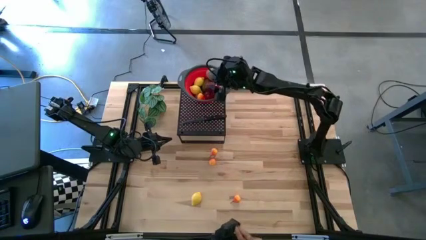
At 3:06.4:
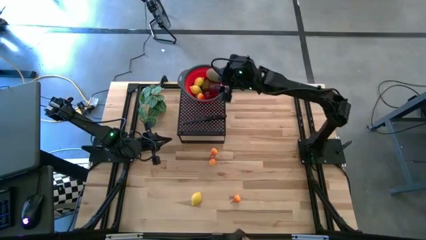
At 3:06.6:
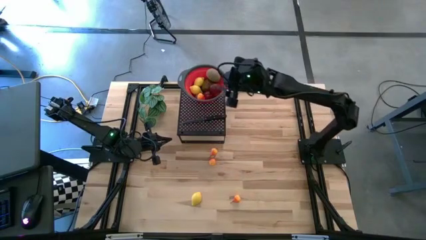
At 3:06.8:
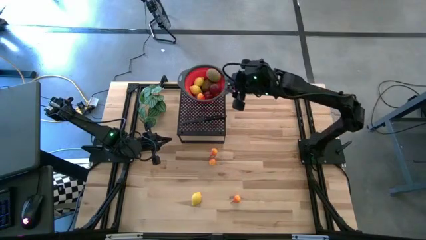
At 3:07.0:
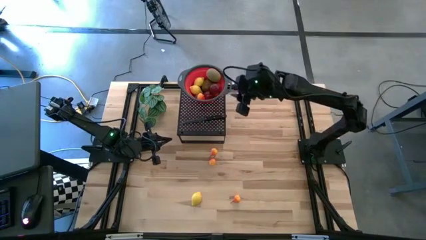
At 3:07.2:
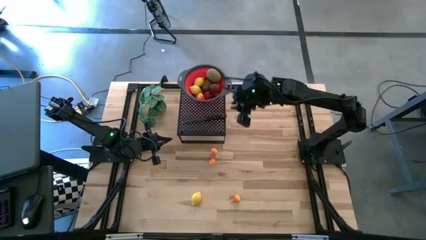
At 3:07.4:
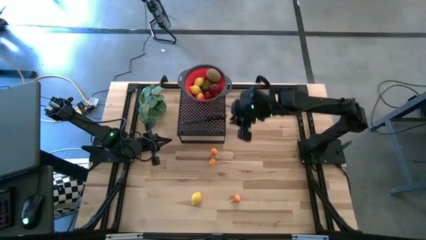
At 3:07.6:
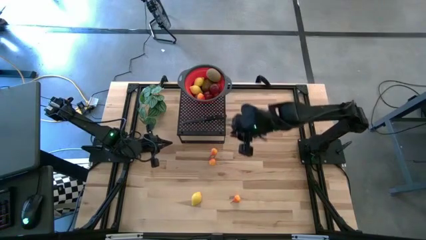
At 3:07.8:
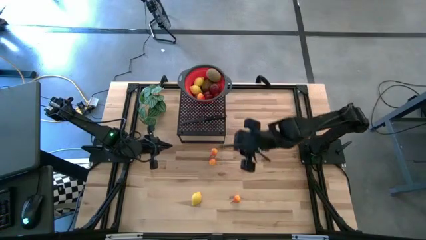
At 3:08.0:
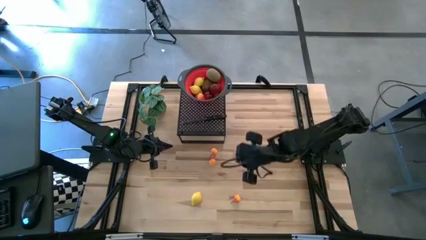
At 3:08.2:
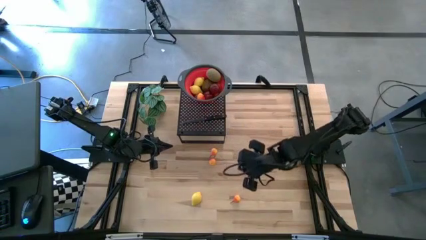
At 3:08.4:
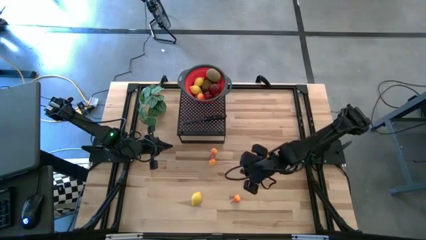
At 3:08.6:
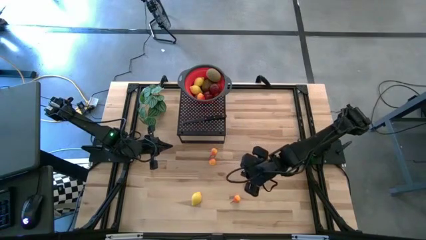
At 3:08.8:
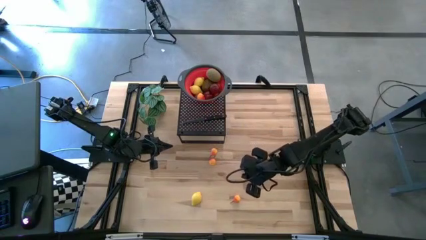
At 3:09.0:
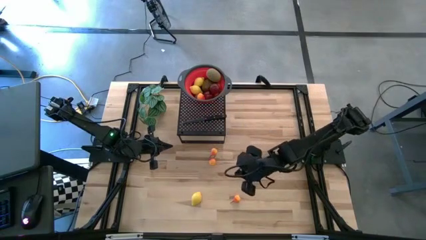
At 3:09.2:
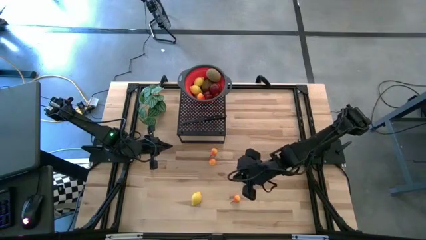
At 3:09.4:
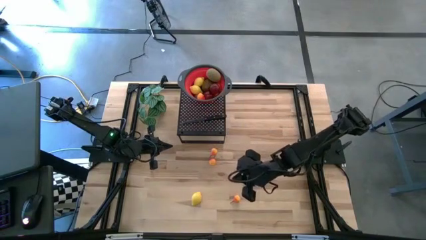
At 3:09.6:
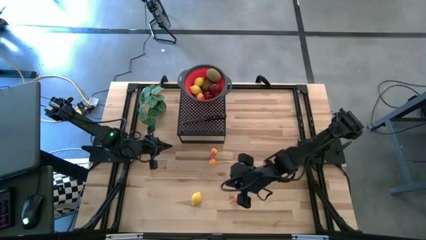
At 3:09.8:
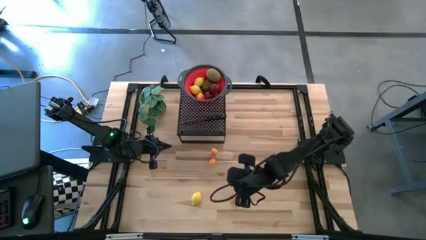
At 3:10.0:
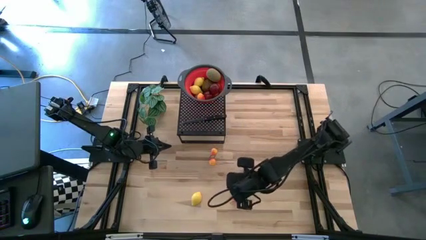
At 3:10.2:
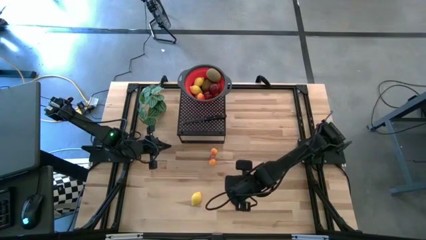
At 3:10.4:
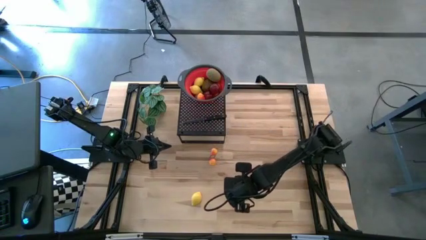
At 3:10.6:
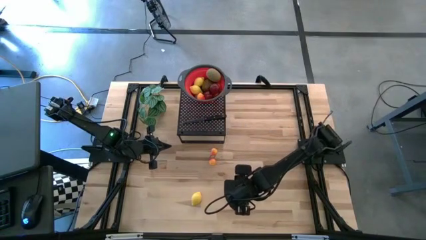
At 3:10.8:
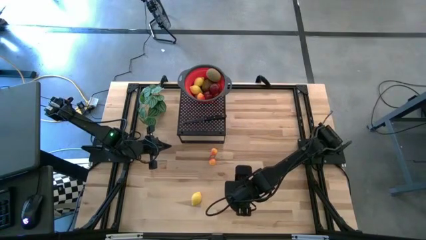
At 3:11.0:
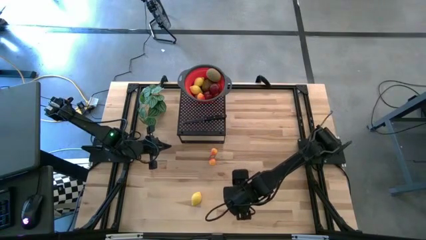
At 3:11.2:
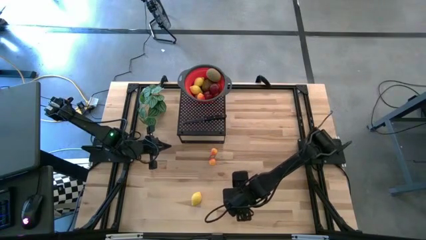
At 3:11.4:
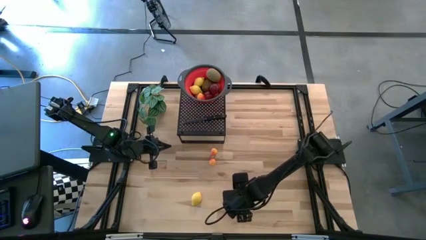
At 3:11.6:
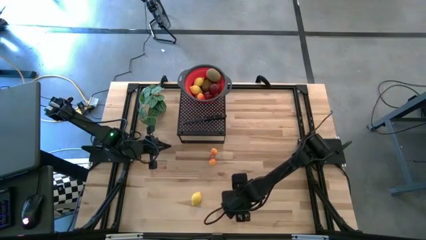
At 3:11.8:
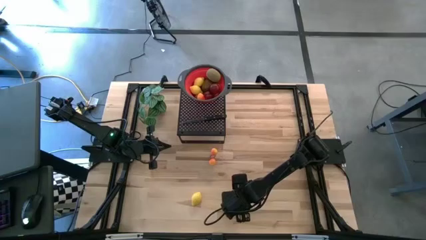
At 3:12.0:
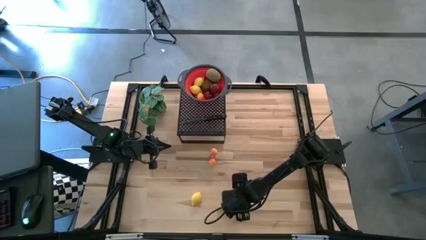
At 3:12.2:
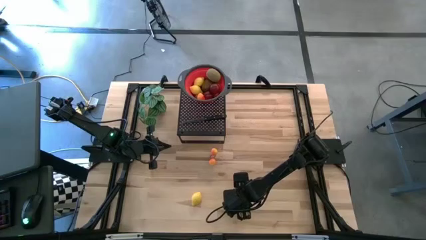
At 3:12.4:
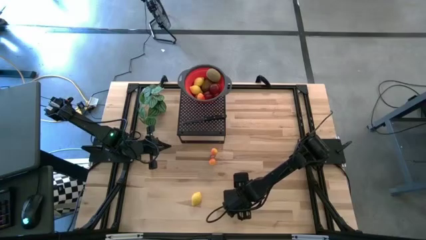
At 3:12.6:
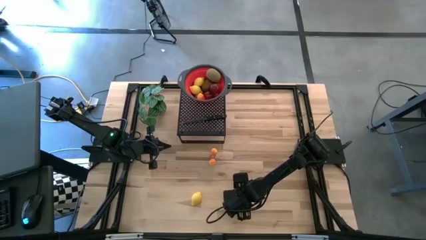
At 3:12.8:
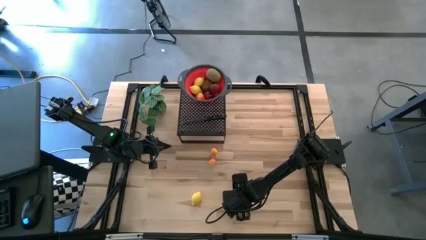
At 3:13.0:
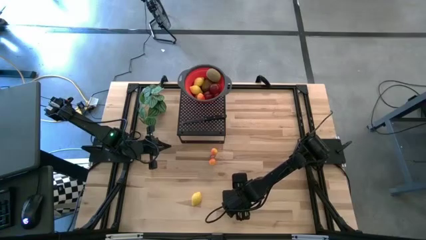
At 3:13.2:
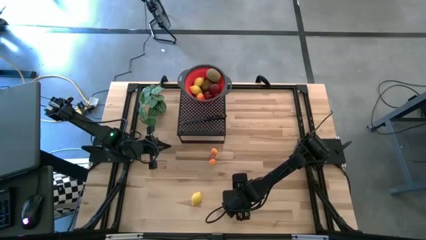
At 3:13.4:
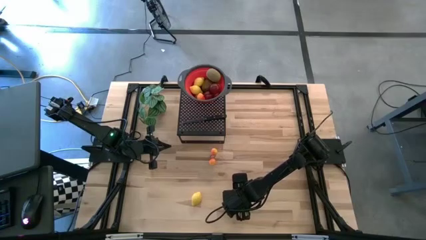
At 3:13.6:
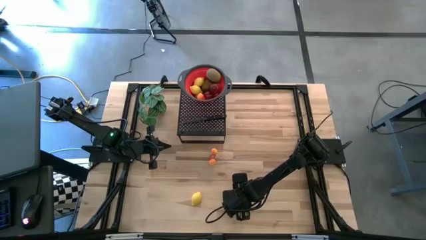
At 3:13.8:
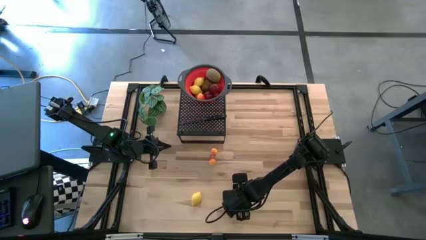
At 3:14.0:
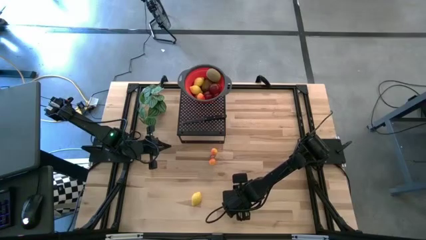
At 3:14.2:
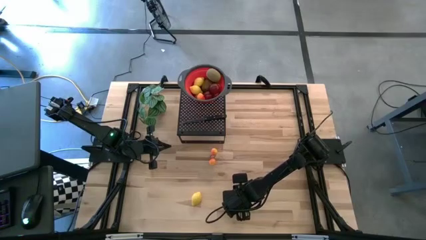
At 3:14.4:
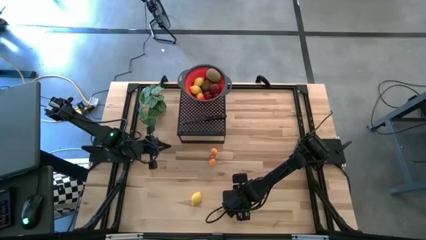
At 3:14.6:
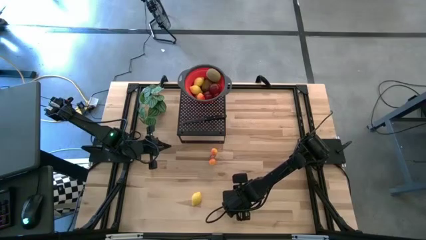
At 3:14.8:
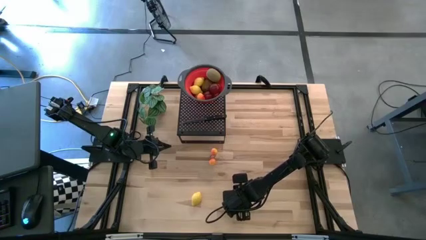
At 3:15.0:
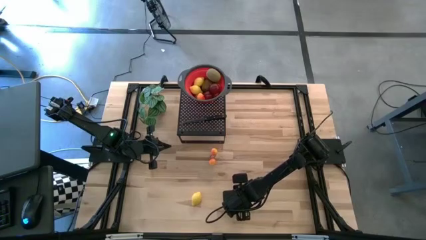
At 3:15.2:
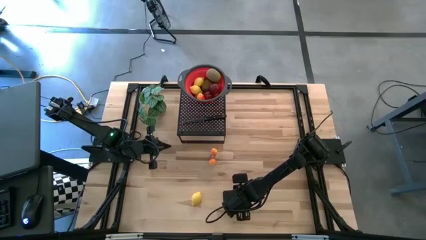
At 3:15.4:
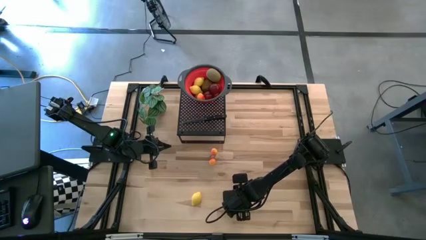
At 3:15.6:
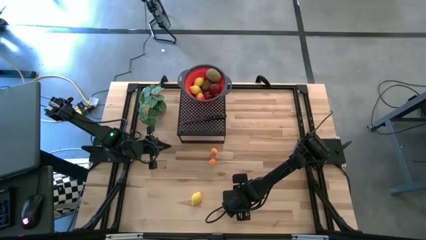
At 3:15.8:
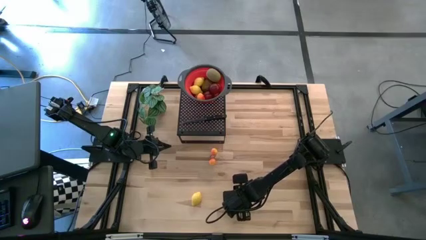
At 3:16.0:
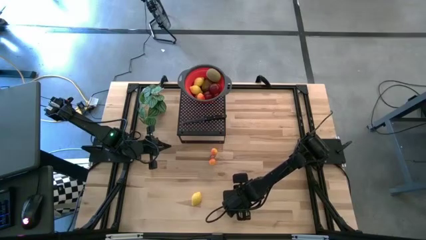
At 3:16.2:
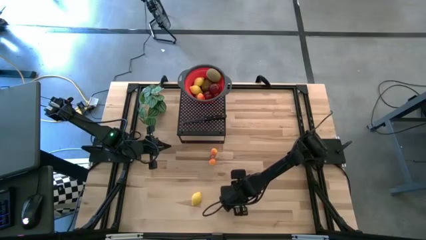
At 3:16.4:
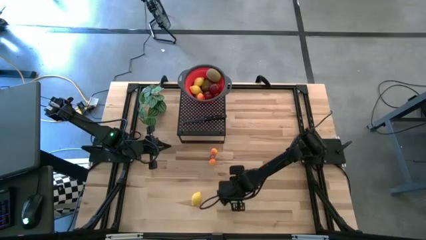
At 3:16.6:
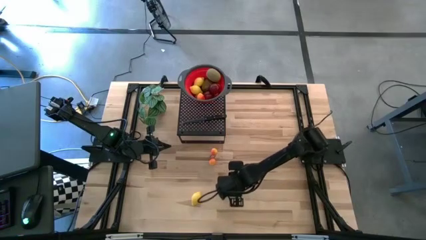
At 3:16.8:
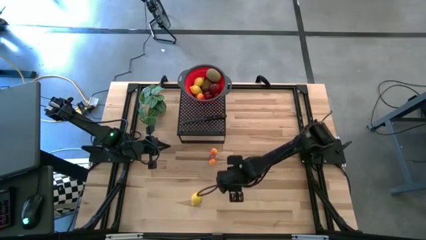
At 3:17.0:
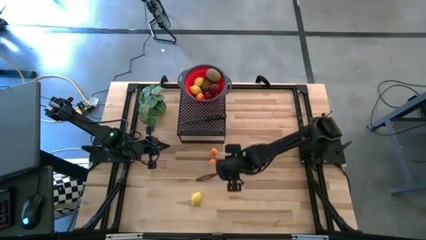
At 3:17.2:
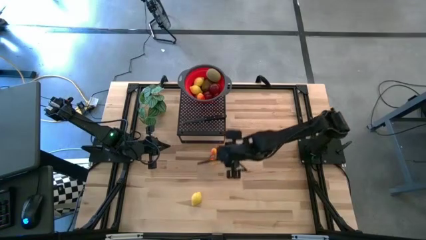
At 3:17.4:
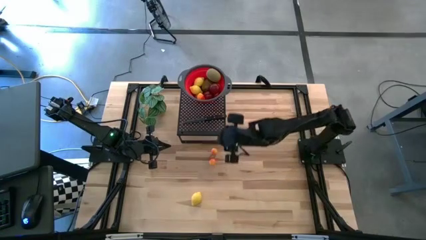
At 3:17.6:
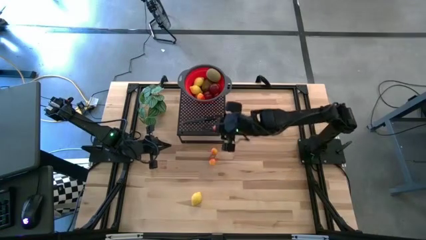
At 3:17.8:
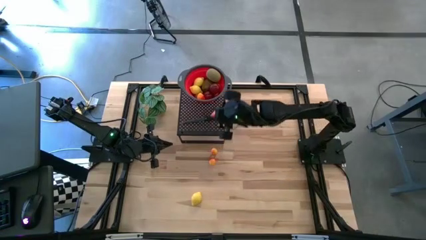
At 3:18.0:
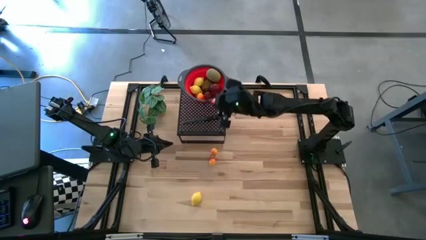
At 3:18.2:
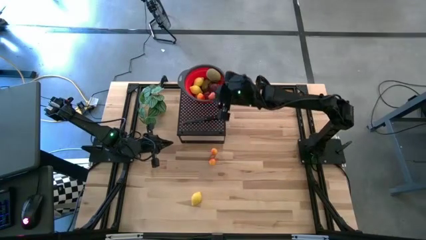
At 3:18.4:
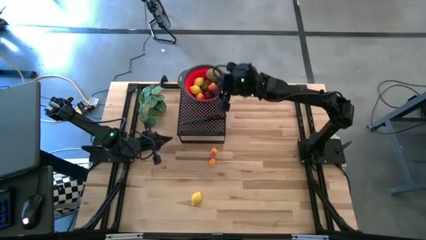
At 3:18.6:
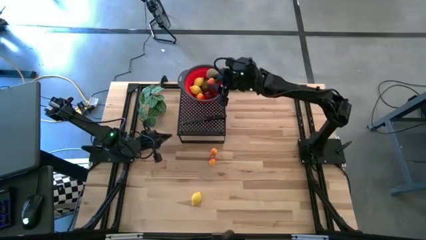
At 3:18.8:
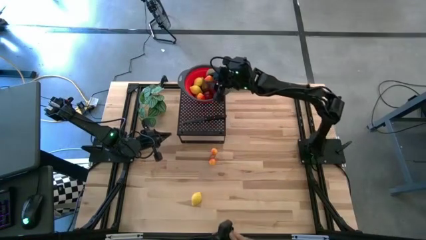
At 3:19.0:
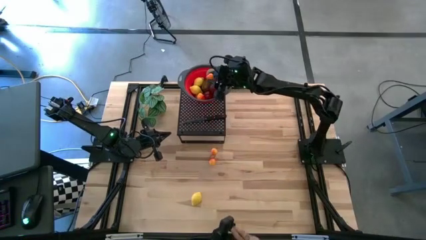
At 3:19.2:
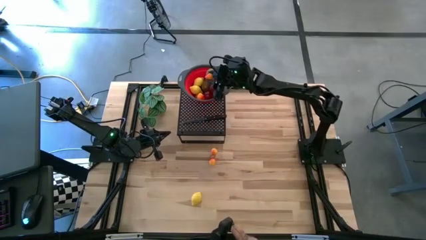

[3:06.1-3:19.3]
Task: Pick & Place Fruit
Put the pear into the red strainer bowl

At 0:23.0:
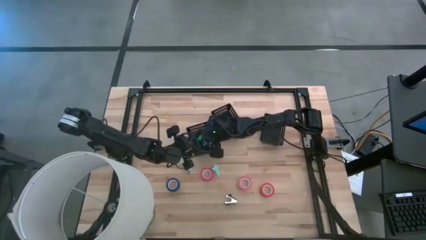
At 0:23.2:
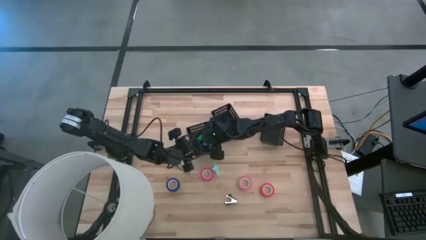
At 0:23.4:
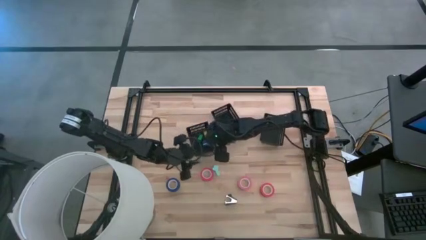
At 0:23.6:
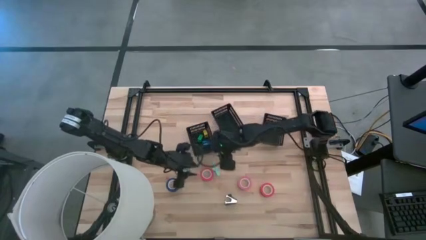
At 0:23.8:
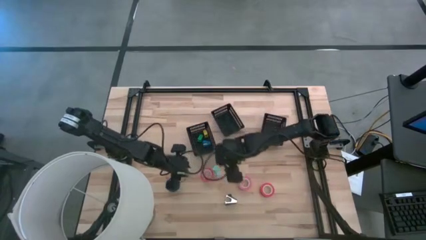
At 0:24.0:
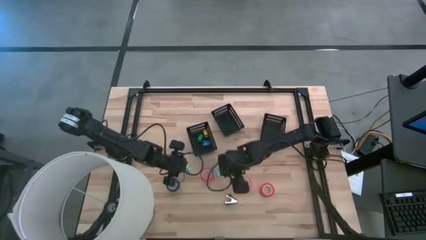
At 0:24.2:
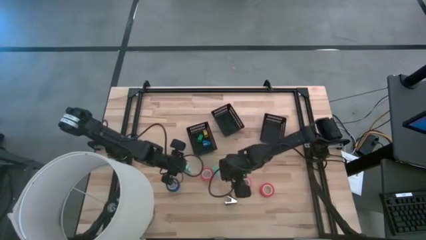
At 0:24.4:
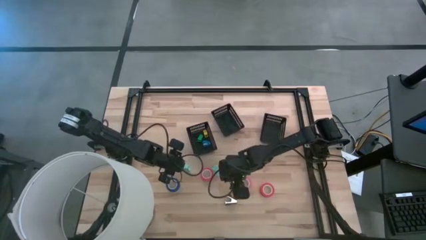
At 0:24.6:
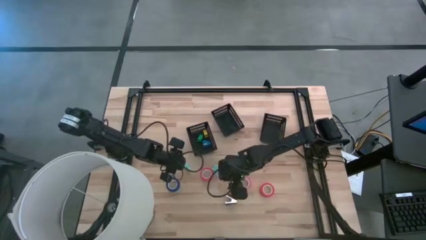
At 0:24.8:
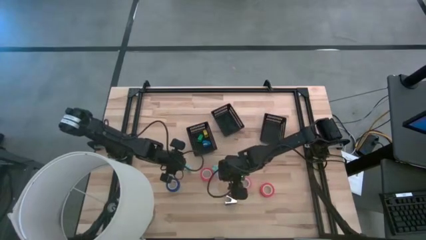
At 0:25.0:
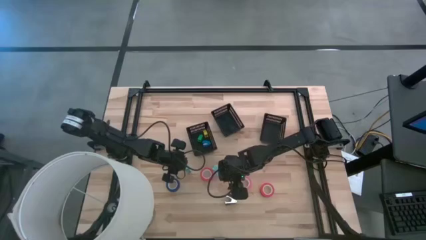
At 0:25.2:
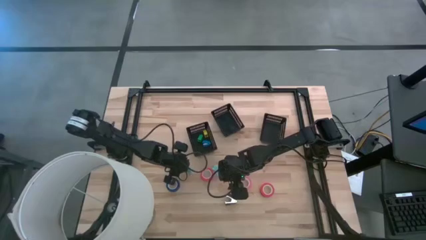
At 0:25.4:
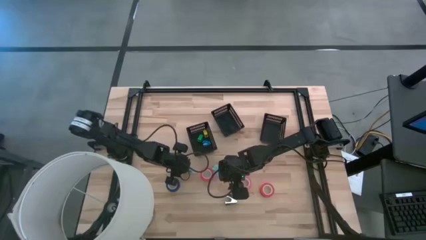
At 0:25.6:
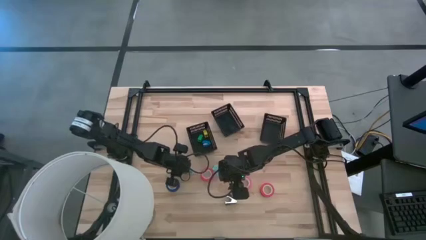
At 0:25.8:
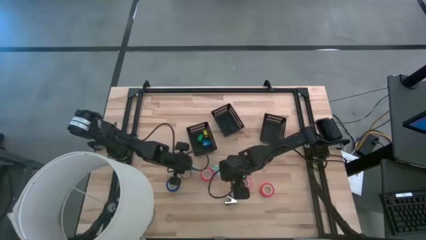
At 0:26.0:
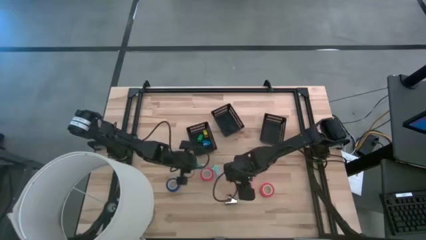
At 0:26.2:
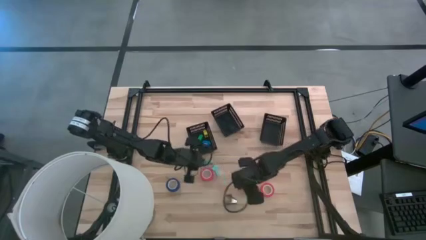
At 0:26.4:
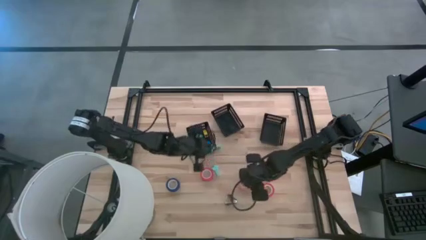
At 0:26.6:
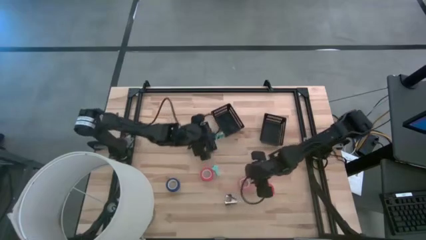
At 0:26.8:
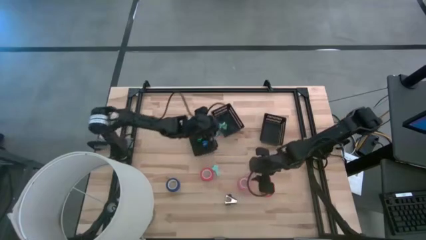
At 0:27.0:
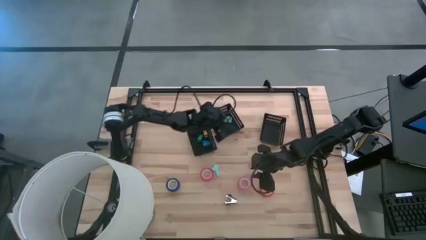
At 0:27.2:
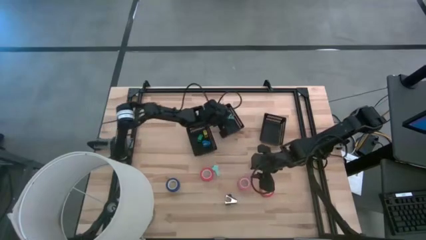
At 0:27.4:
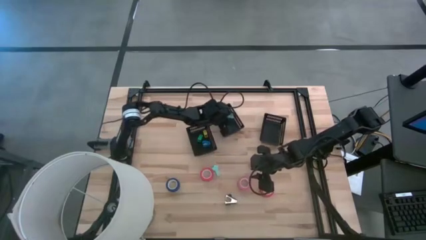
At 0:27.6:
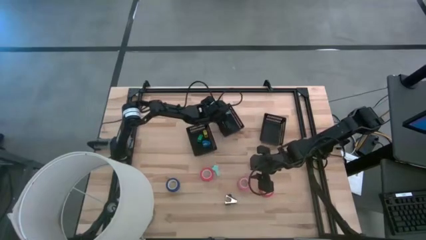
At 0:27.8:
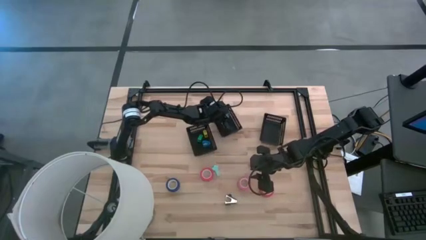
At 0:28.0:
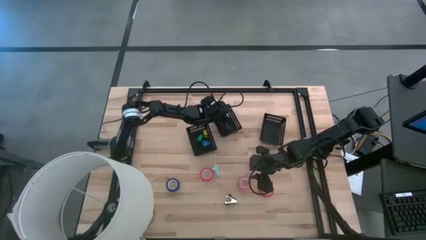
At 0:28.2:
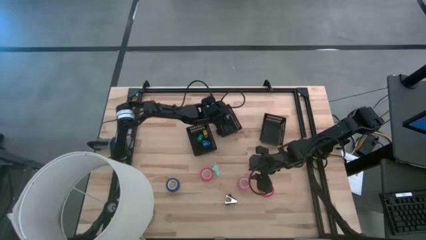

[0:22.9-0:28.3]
Task: Pick and place Stapler, Stapler remover, tape
Put the left light blue staple remover into the middle black basket
